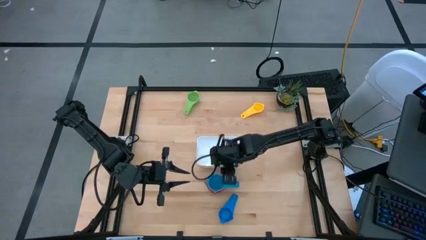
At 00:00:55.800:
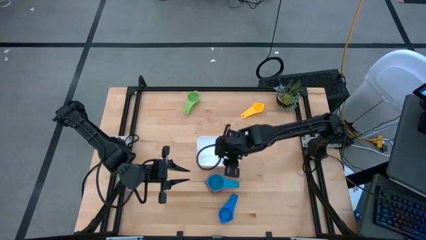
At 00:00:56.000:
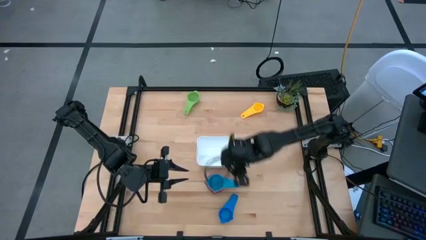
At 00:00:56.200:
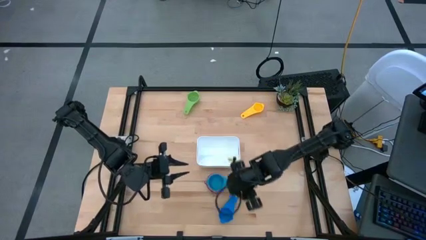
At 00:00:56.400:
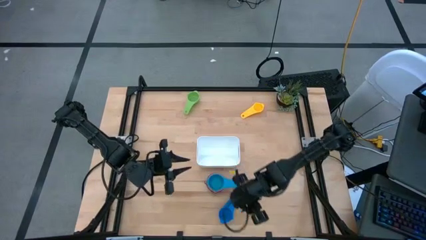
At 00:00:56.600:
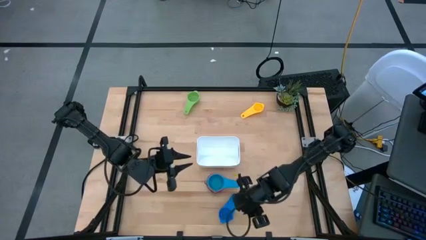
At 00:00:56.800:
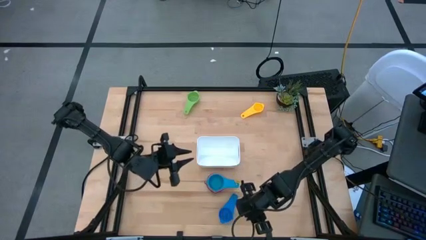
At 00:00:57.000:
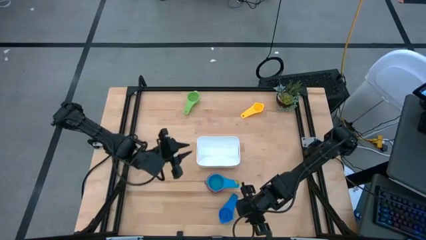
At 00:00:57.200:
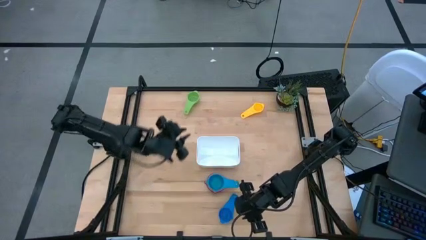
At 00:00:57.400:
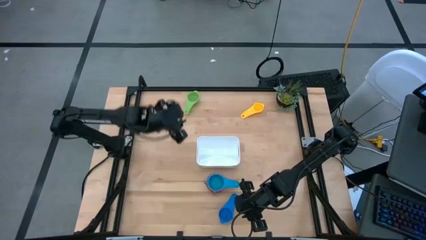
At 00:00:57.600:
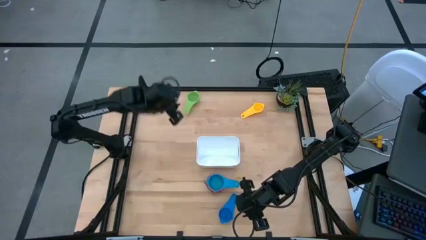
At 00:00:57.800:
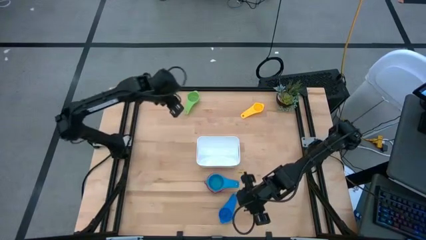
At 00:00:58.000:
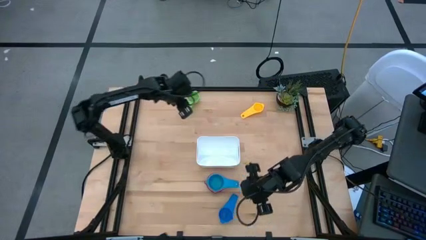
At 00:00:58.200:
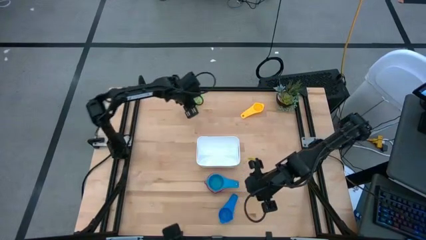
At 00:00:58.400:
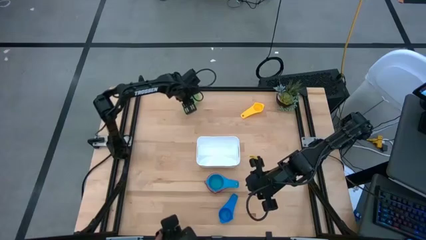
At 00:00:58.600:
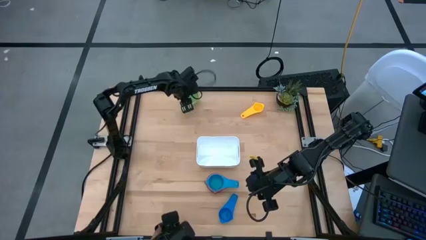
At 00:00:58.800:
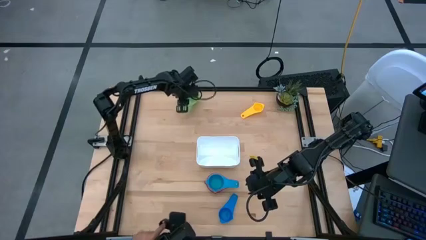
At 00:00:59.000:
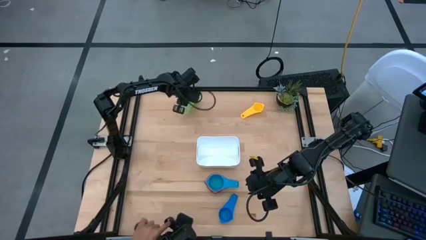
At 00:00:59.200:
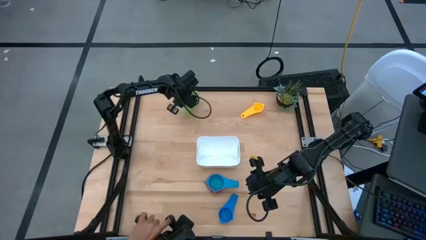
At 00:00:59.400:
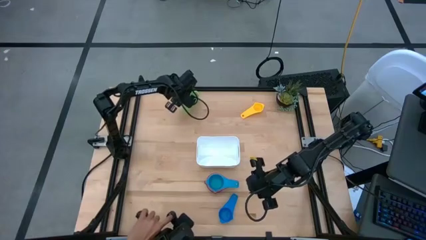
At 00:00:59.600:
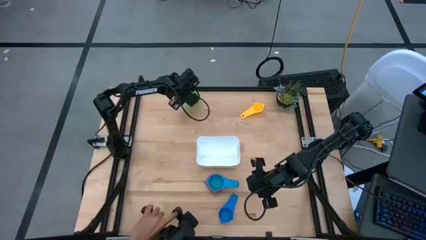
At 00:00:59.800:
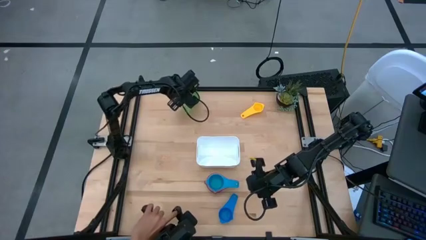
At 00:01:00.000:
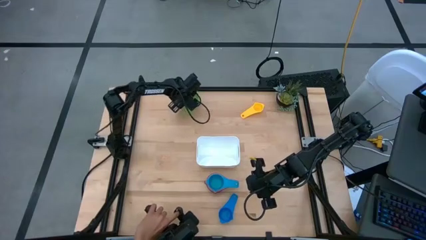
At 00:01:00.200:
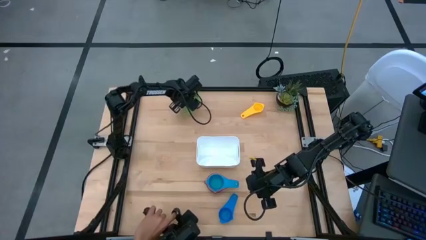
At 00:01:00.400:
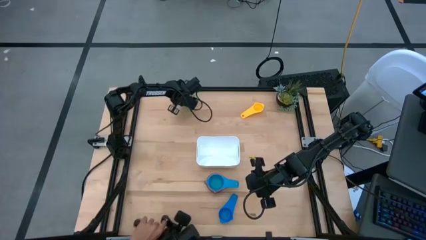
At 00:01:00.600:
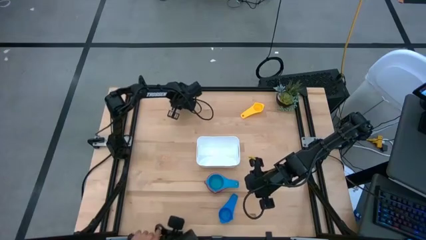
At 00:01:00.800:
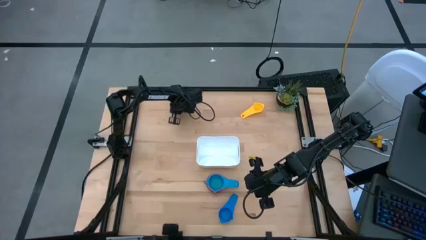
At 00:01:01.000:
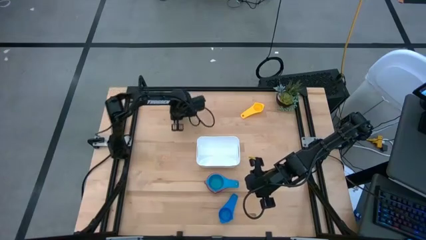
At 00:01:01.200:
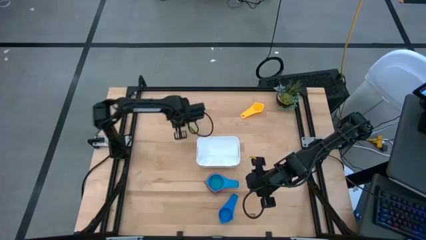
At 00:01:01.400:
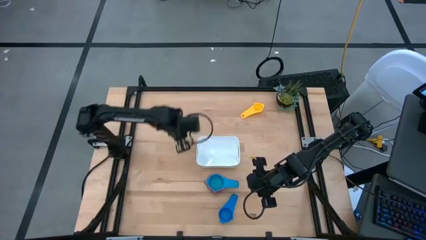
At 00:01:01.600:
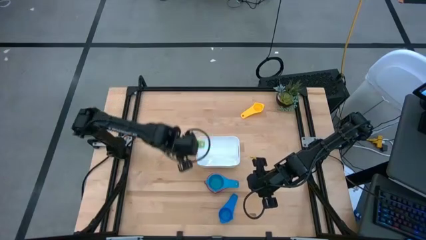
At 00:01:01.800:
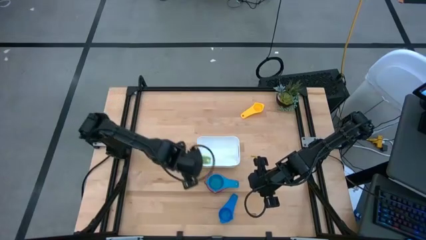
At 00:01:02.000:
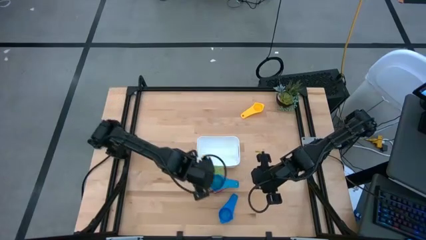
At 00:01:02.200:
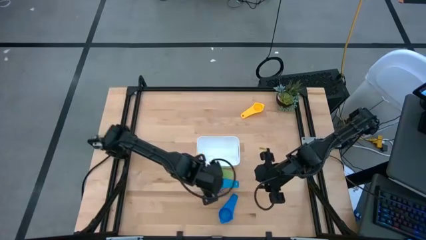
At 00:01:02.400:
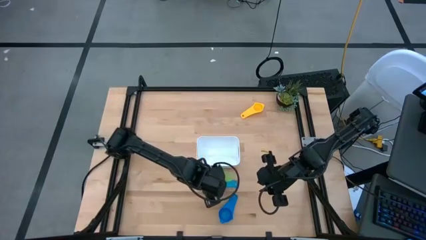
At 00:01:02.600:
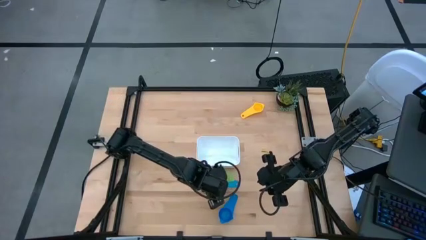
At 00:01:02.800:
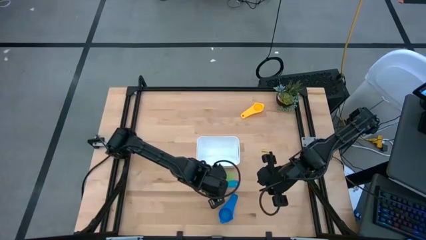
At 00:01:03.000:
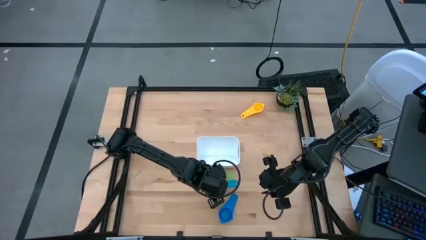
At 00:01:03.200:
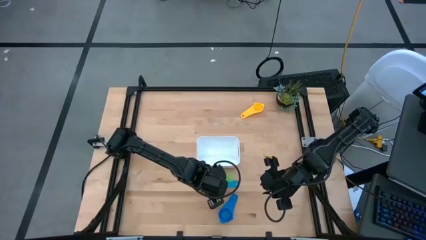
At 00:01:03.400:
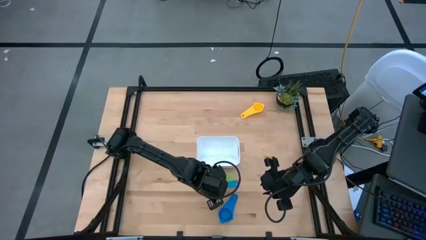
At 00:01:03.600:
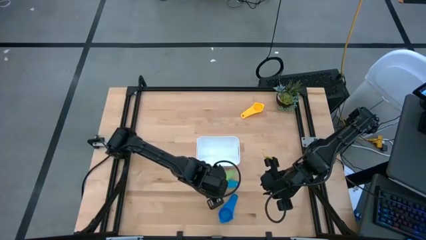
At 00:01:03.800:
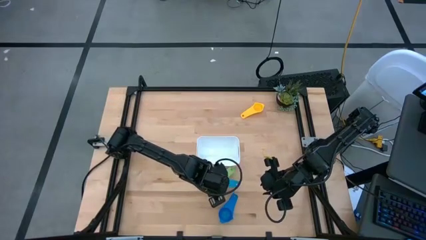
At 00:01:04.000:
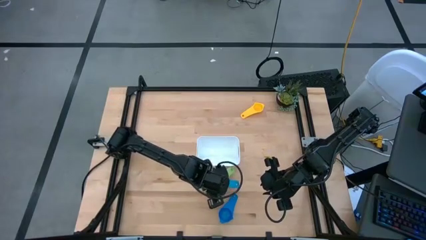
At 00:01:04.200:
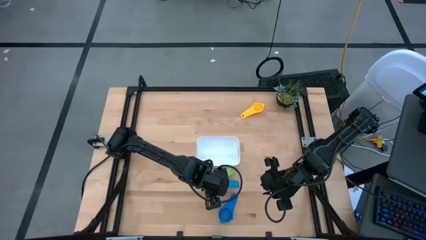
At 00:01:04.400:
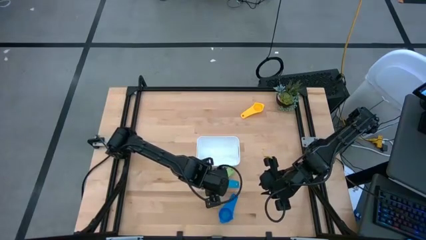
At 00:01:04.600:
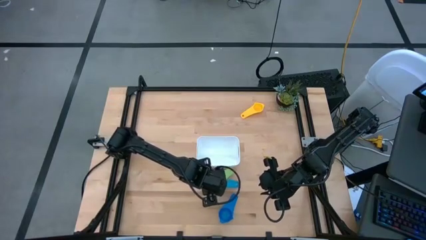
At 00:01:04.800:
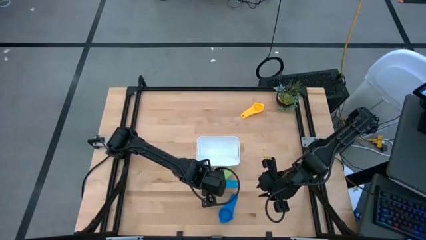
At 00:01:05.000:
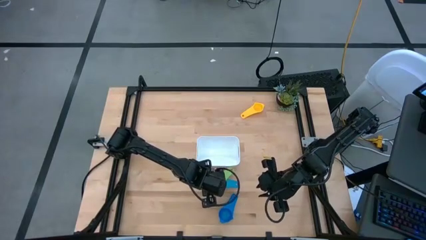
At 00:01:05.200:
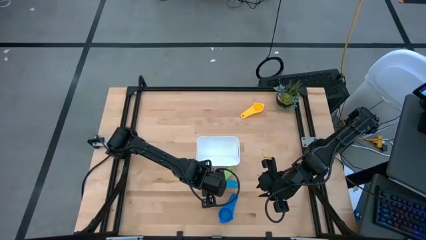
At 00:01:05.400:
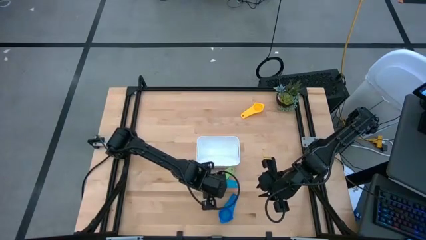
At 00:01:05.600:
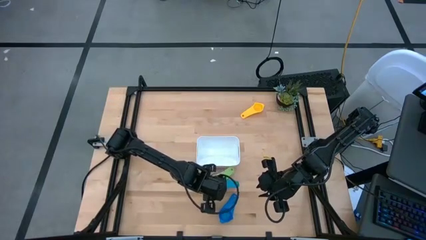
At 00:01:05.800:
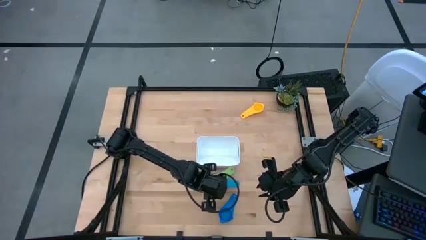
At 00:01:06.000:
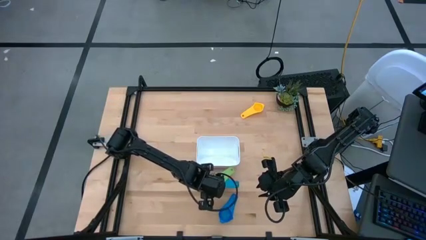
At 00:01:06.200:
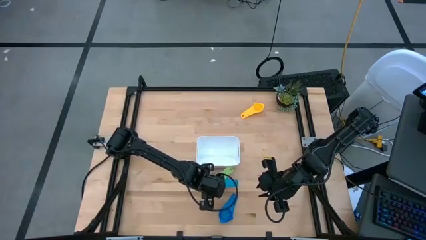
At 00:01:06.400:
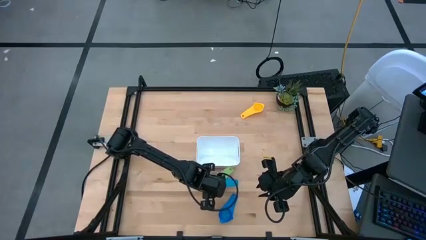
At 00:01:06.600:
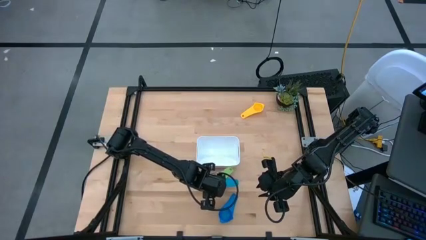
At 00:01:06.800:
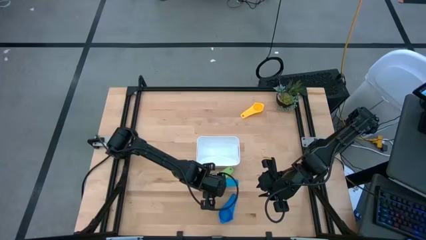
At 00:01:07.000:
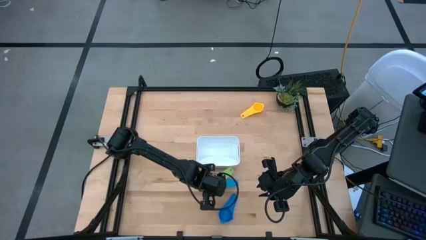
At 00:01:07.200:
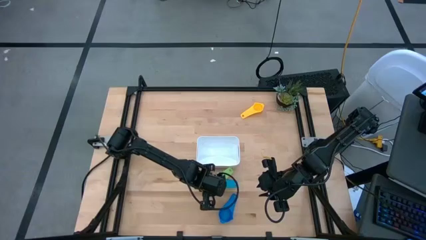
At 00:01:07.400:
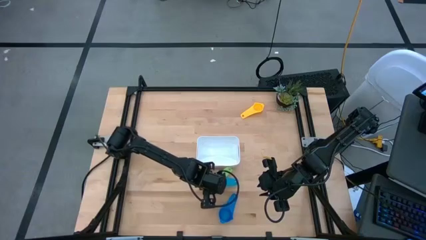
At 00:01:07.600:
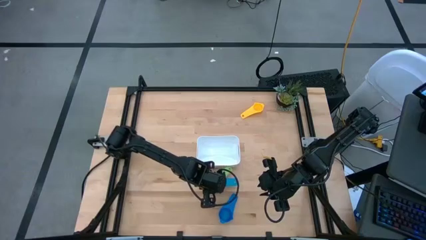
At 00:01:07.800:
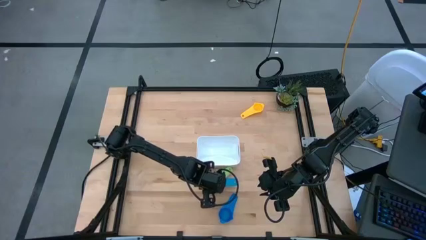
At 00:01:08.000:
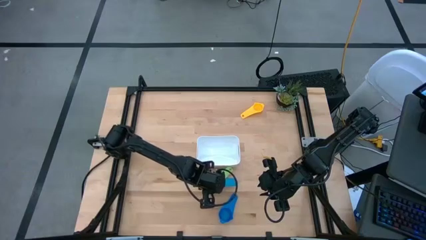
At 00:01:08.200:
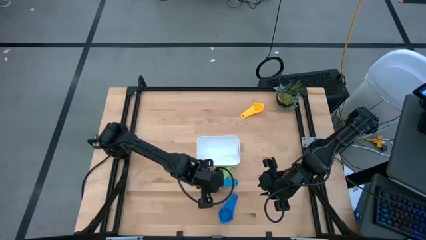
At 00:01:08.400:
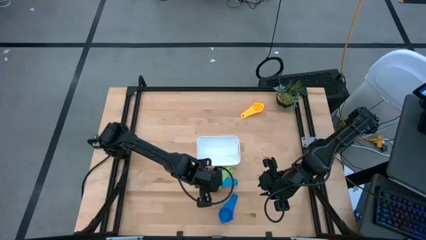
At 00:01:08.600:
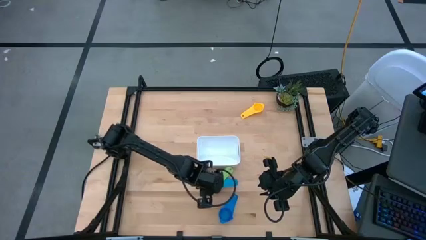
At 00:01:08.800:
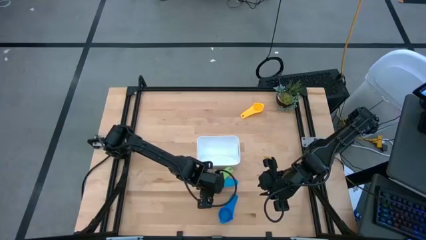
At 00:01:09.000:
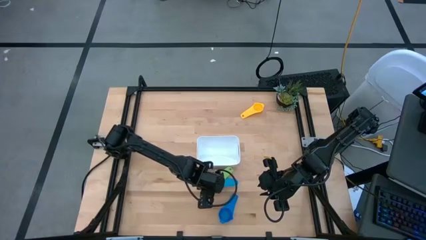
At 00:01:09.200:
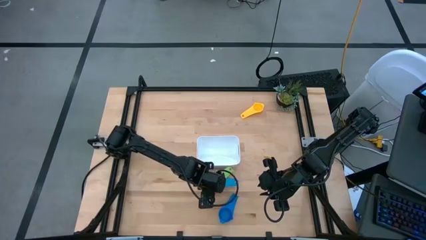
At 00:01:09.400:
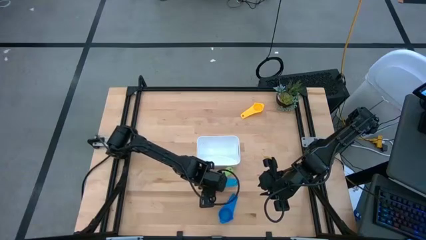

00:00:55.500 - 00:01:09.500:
Task: Nest measuring cups in basket
Stack the green measuring cup on top of the stacked measuring cups
